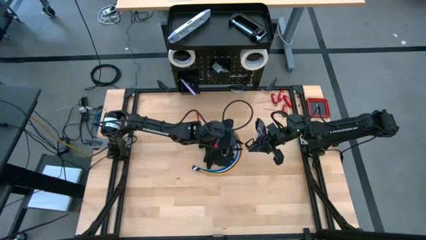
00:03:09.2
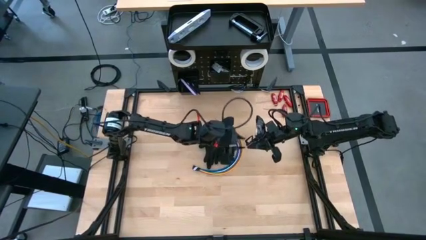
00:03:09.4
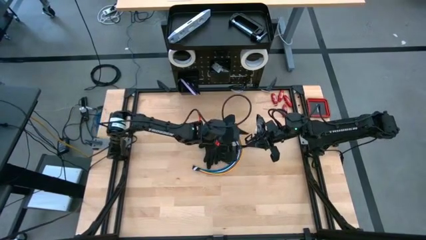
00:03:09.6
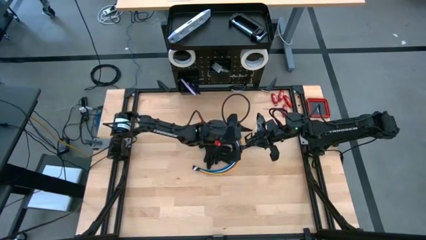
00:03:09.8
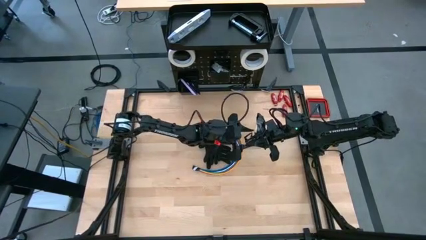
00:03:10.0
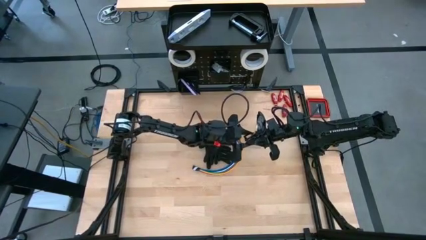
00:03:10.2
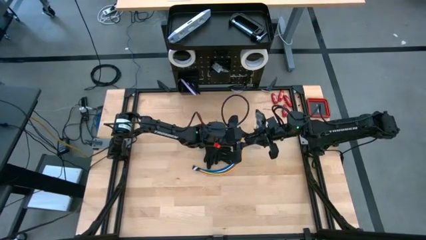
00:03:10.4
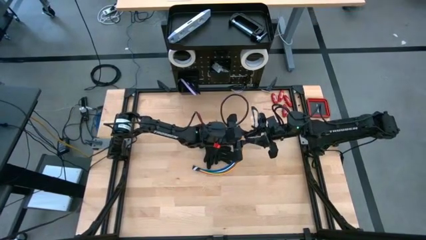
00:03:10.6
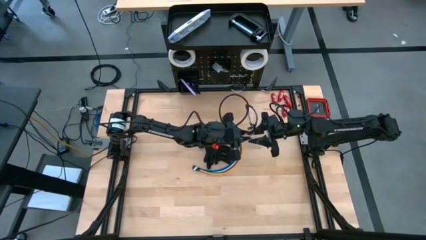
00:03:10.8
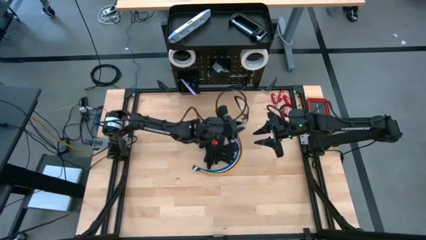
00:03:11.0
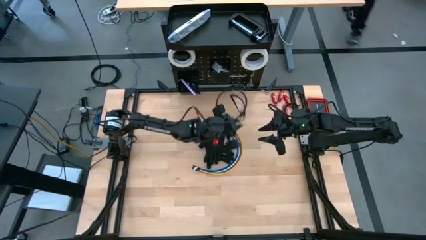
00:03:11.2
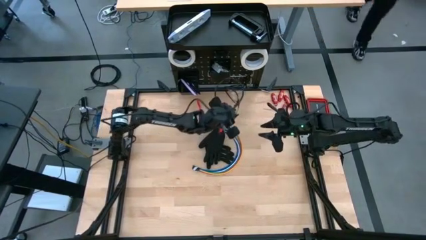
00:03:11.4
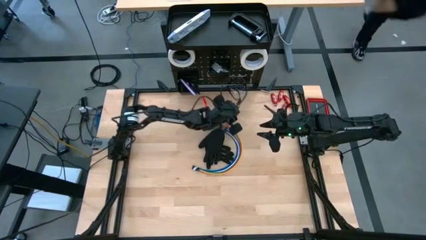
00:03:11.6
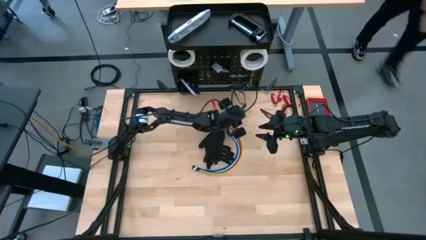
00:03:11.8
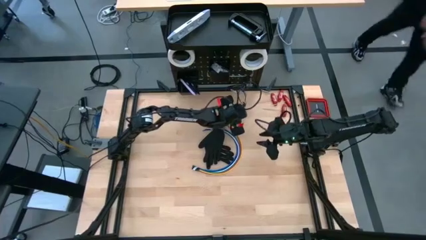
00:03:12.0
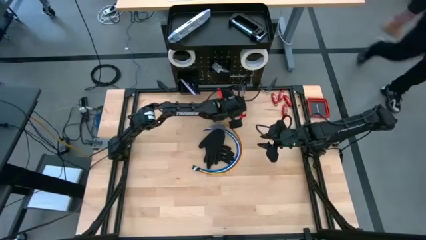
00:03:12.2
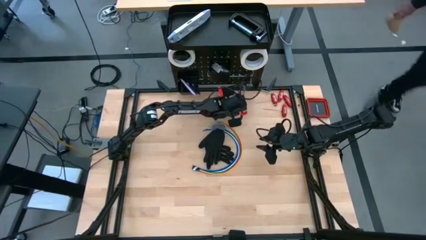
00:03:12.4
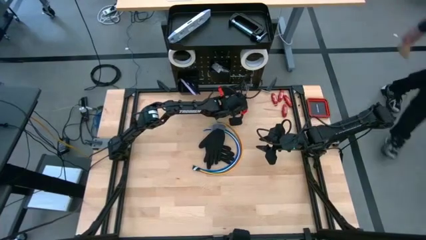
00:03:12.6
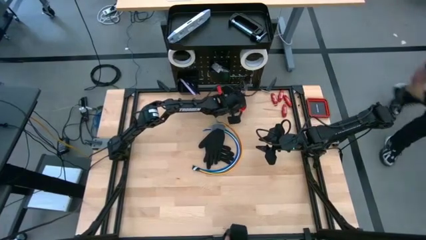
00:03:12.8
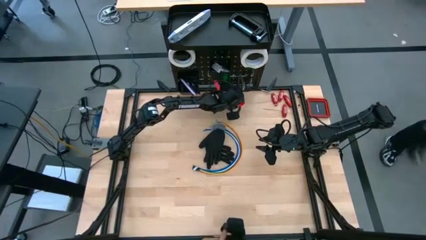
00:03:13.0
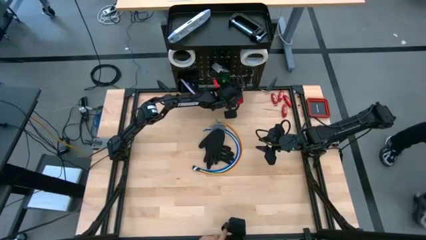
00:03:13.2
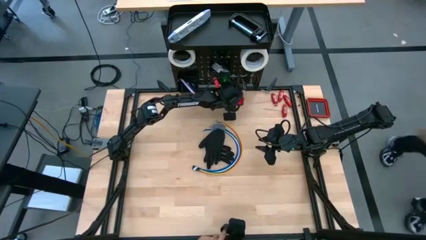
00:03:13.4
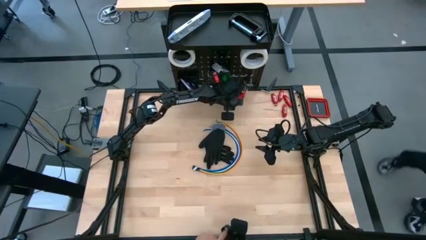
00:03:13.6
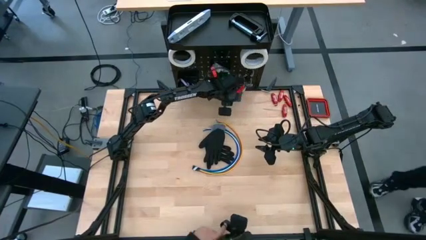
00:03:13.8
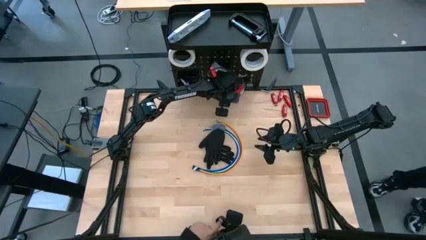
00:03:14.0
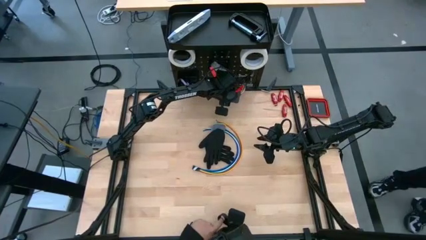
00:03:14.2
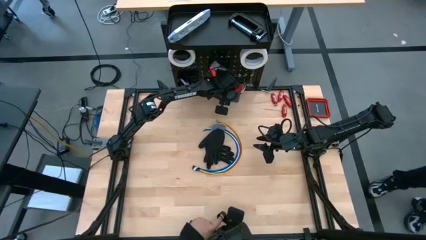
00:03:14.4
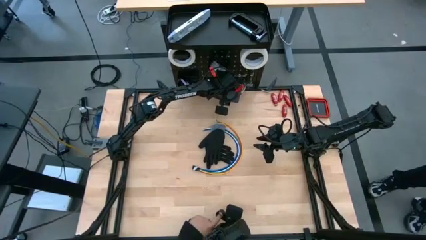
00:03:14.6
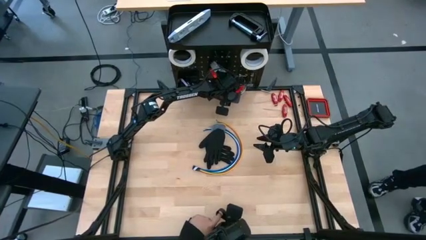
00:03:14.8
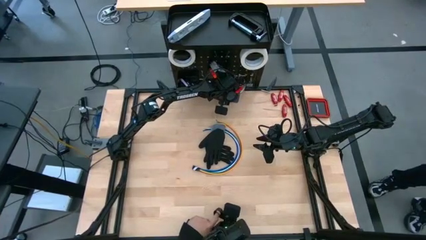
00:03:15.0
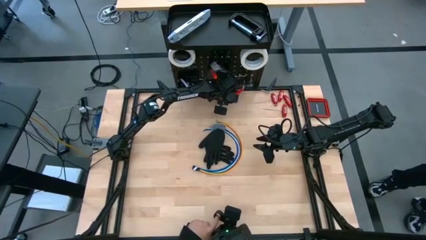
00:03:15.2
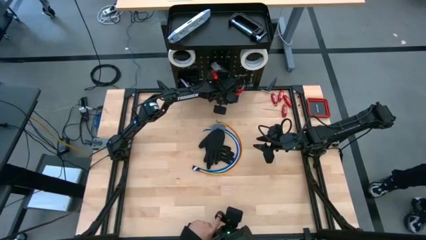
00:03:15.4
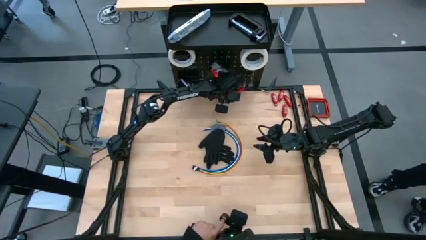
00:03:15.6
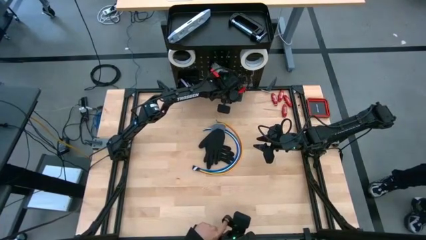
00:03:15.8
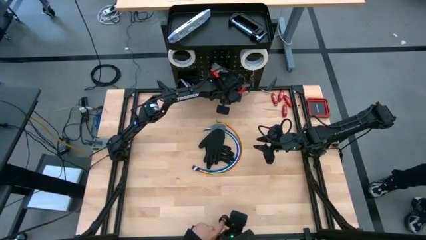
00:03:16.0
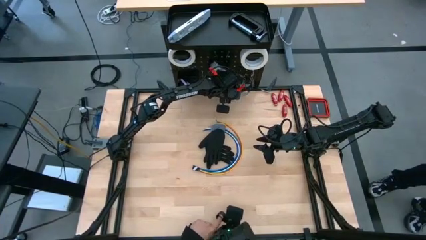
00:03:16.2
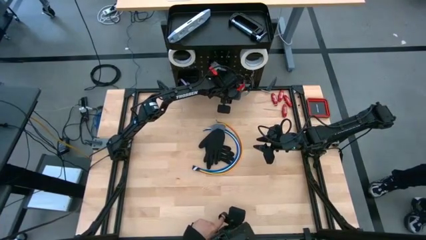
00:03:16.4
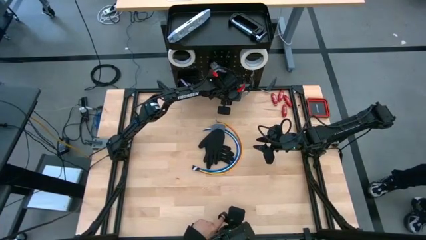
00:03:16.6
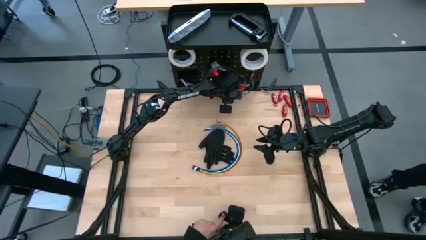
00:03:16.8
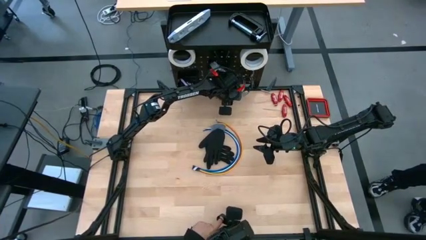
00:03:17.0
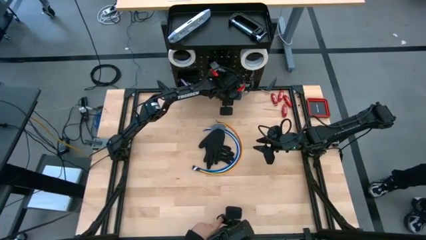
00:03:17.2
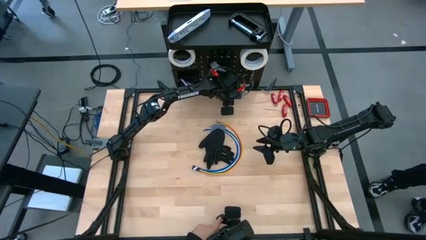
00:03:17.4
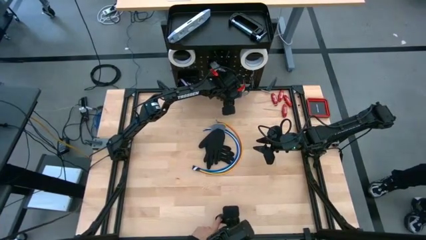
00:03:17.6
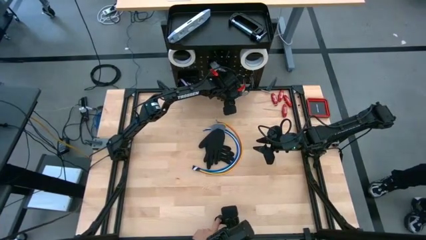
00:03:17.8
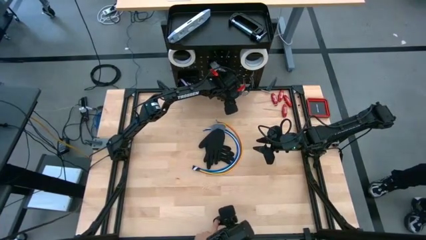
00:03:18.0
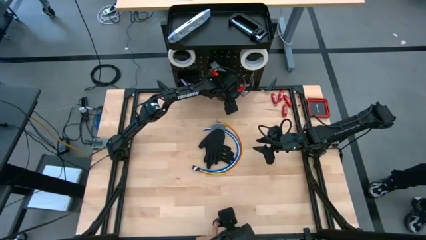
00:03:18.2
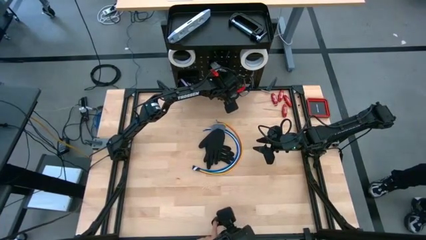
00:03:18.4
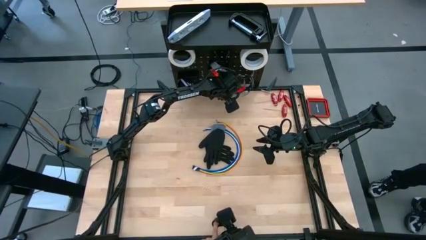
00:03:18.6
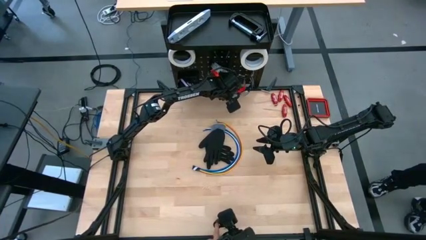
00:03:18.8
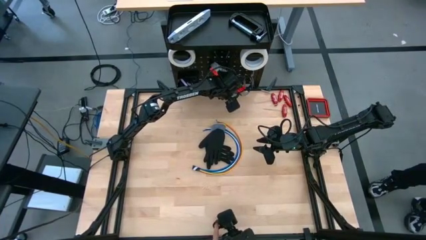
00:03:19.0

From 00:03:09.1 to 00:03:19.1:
Task: Hang tools onto peg board
Hang the safety goggle on the peg board

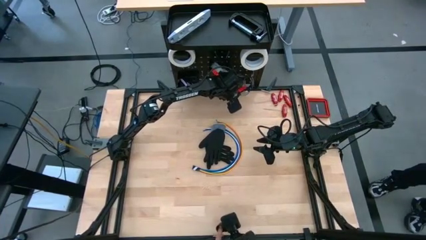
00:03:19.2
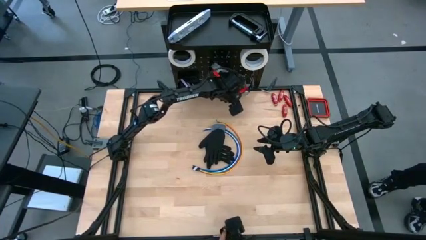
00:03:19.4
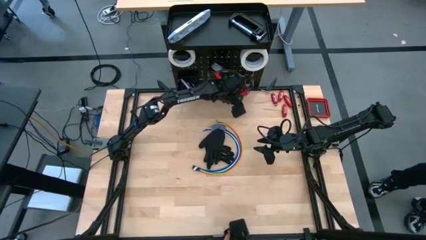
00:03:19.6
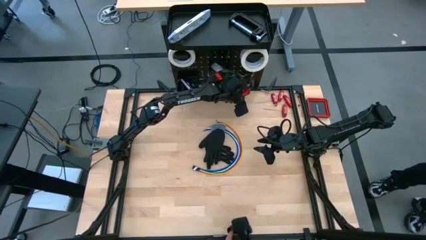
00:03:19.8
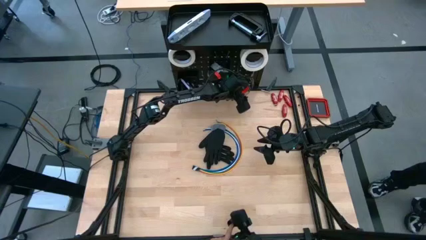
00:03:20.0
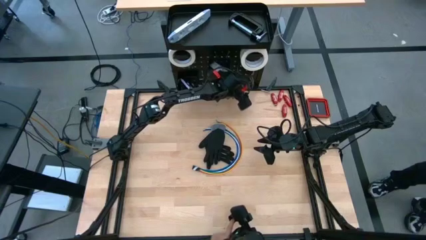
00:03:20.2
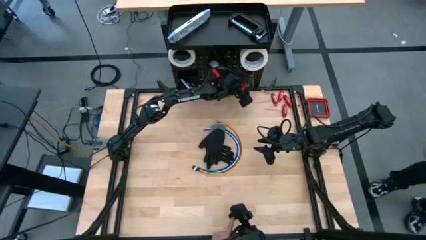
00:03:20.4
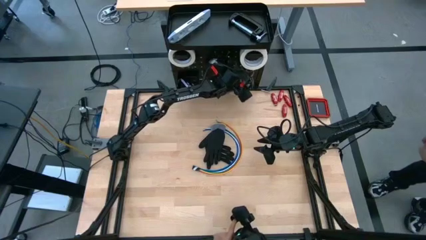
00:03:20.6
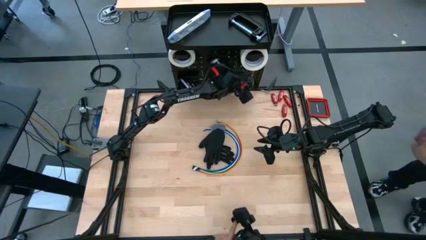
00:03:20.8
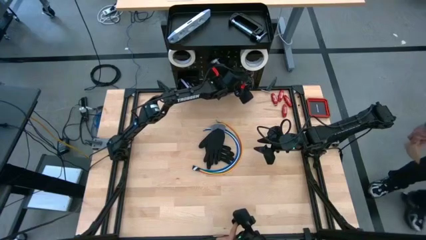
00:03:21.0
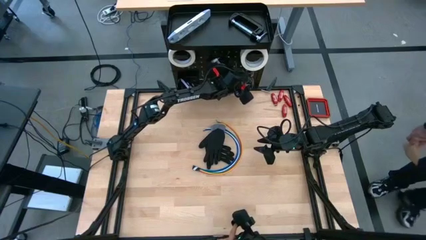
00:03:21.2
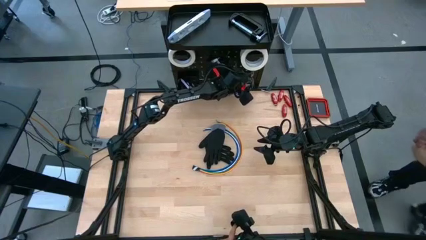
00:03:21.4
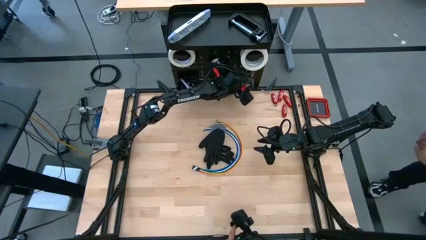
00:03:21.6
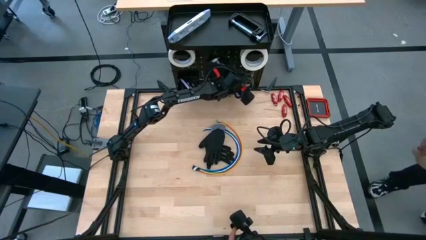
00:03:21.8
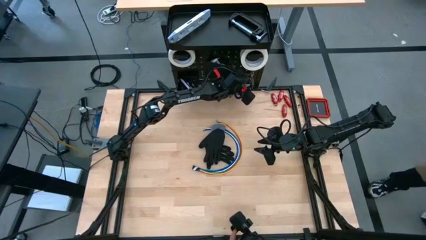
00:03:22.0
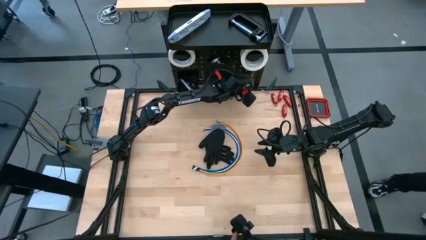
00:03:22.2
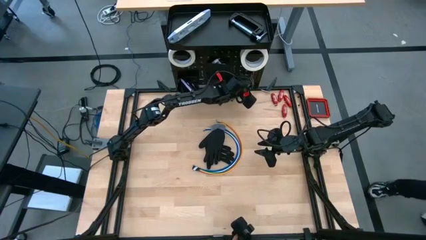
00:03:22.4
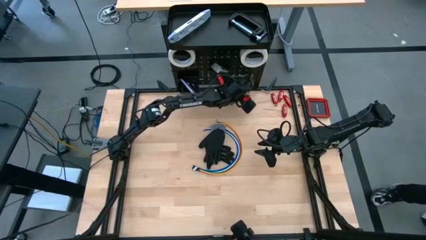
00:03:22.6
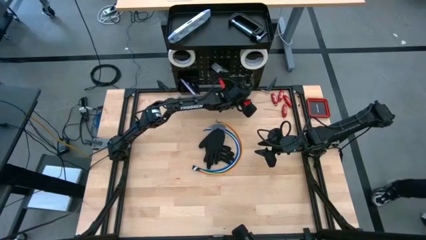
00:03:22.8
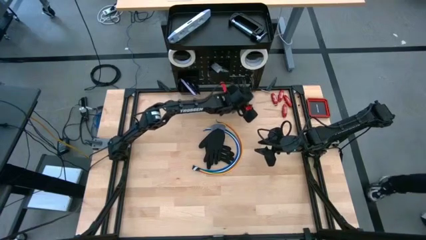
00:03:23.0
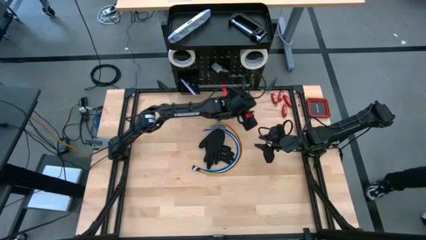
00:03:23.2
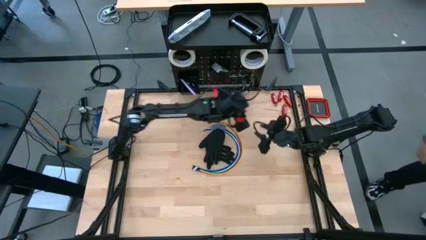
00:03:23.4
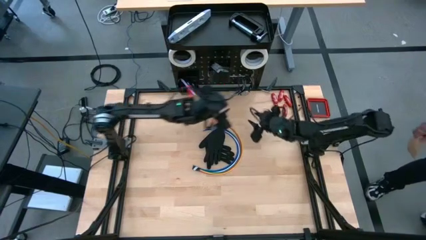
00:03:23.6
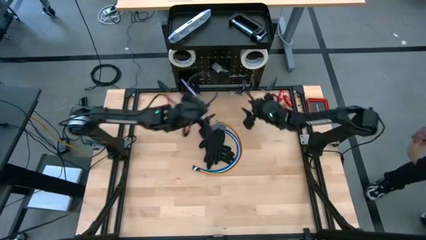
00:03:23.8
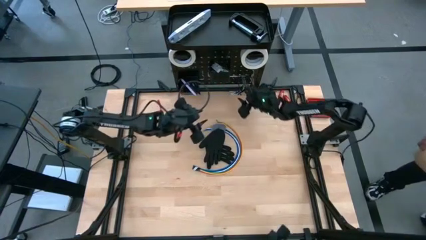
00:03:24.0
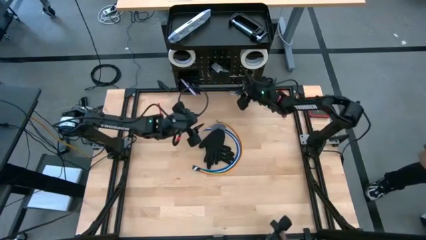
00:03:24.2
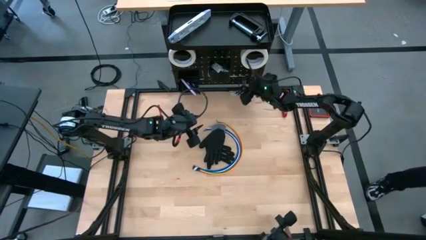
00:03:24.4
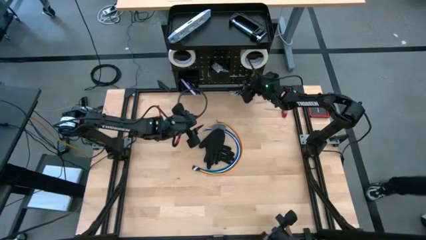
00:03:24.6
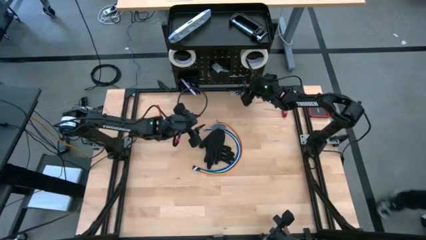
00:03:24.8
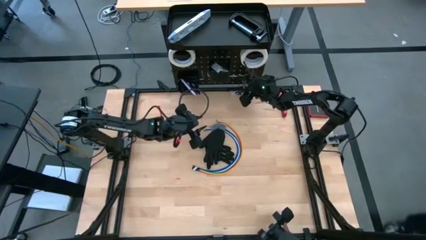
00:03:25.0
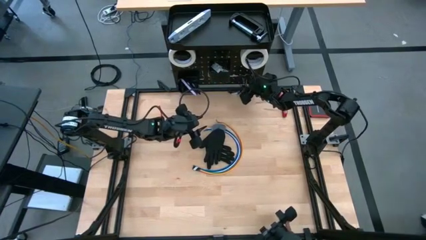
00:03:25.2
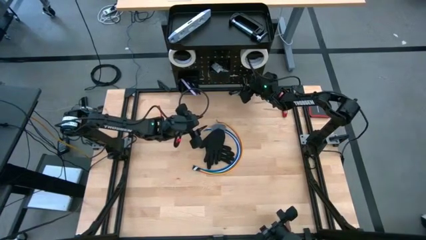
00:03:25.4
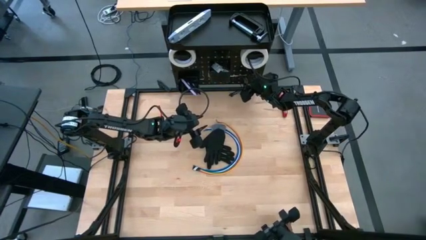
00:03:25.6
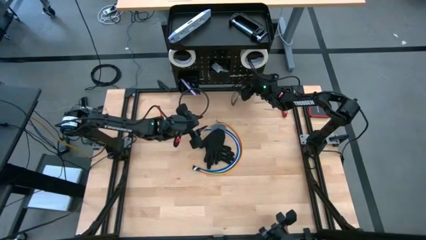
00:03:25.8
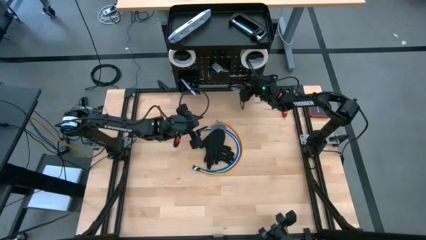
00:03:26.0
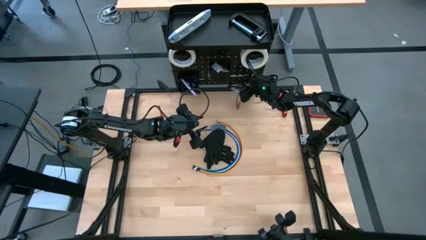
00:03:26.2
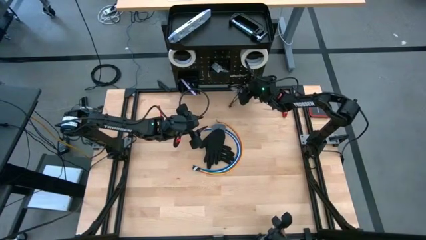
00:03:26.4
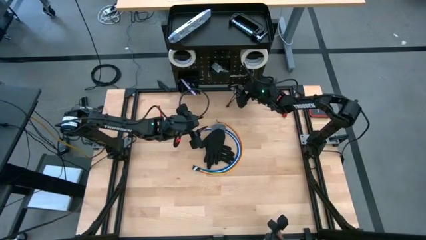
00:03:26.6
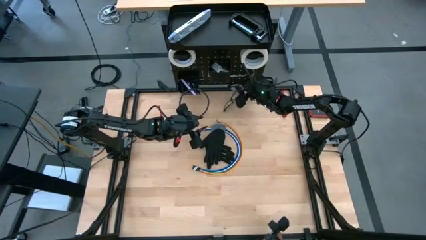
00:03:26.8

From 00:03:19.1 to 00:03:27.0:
Adjust the safety goggle on the peg board
